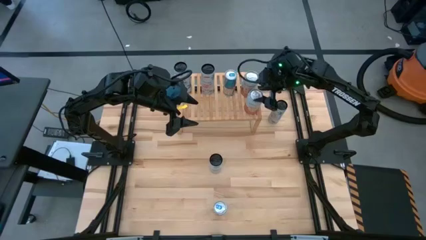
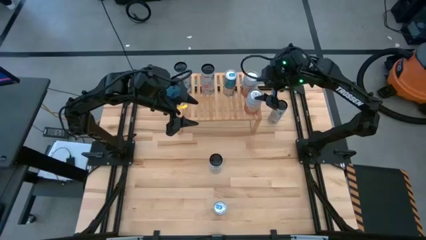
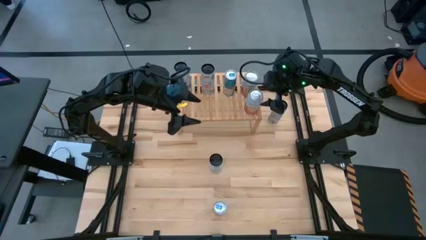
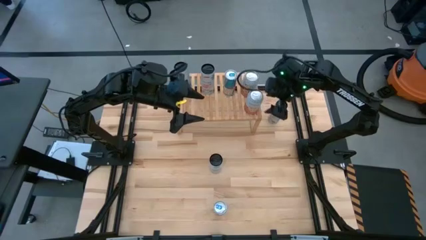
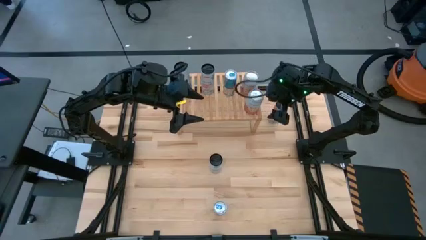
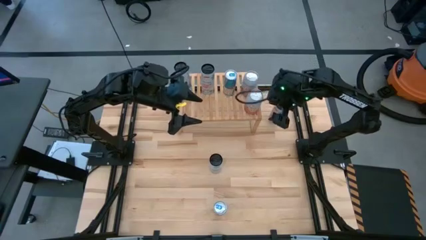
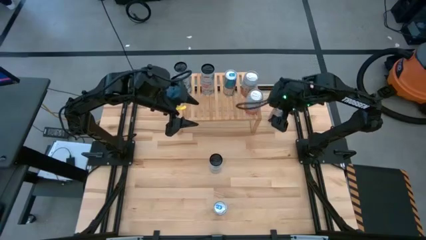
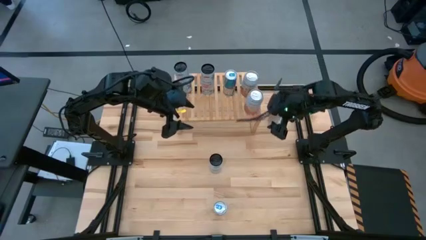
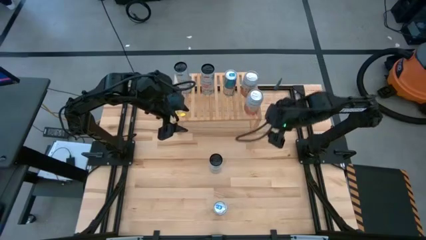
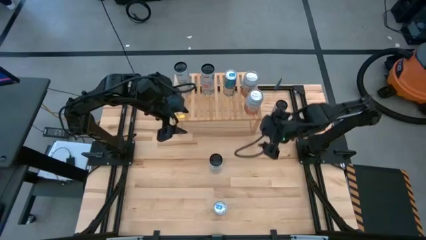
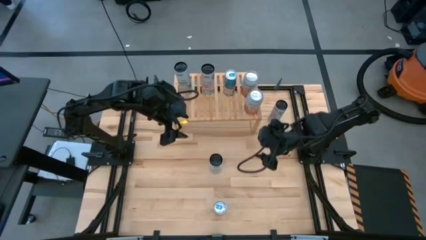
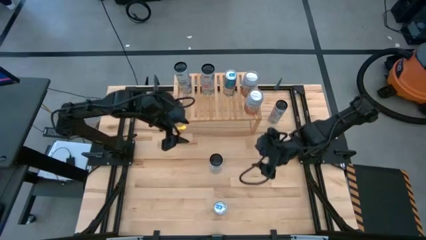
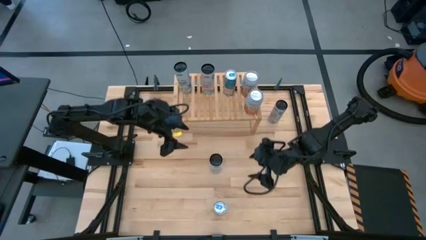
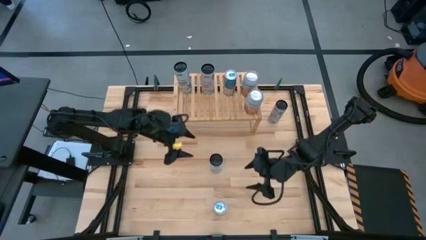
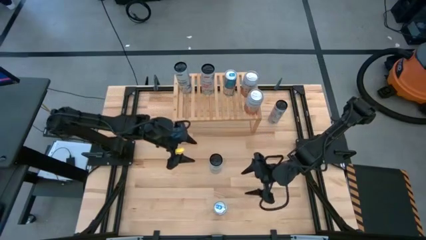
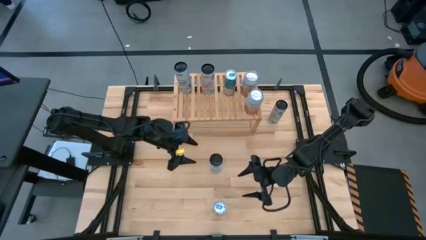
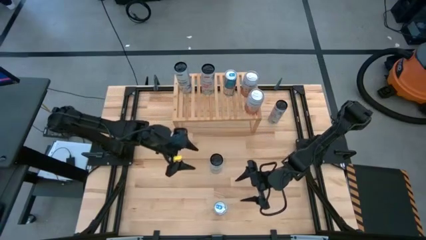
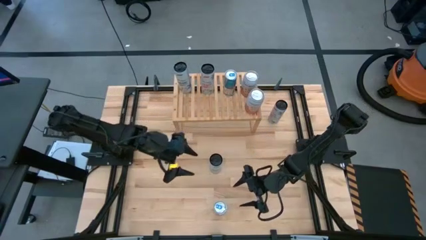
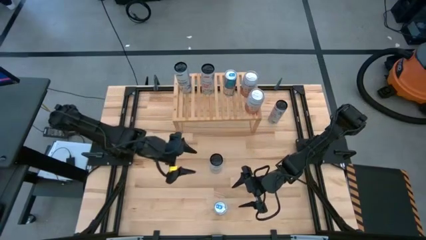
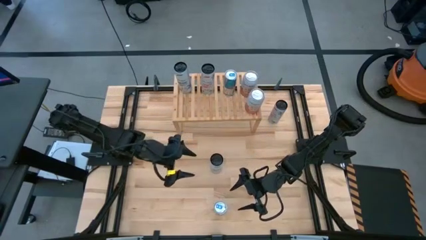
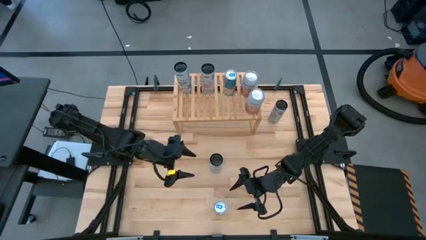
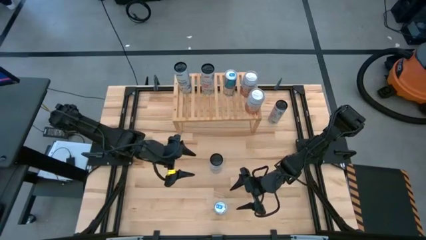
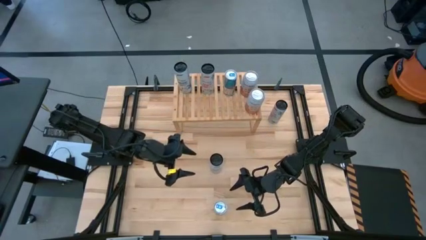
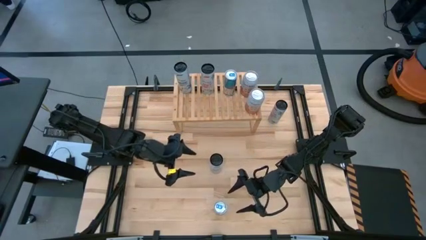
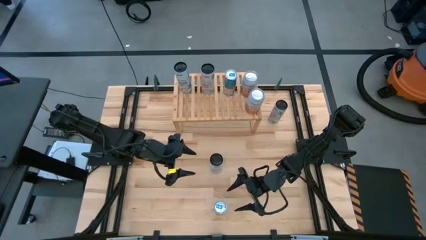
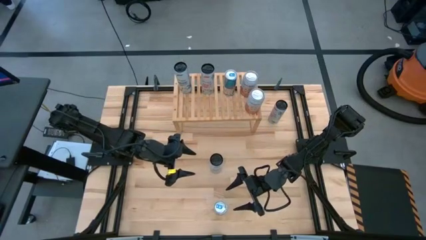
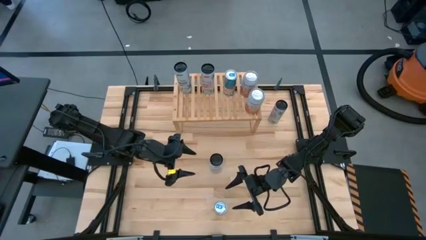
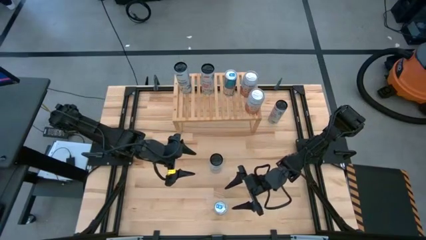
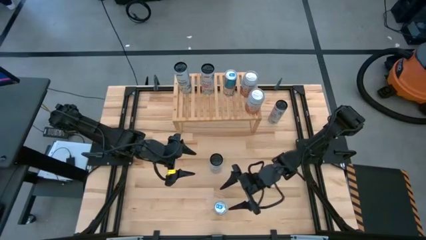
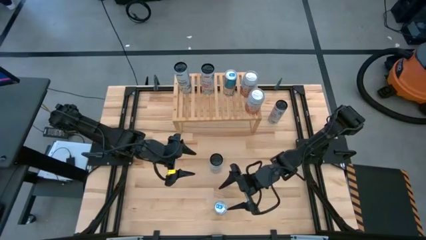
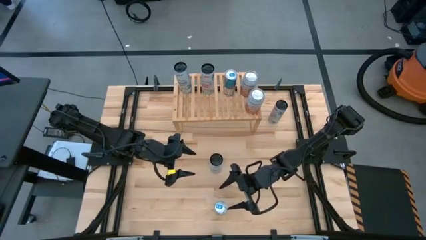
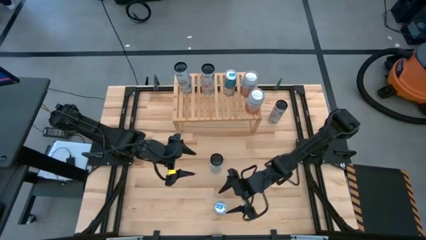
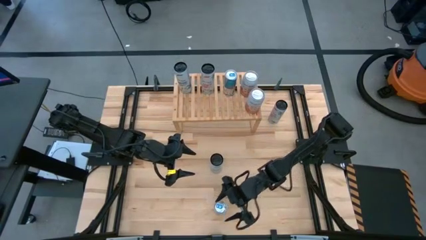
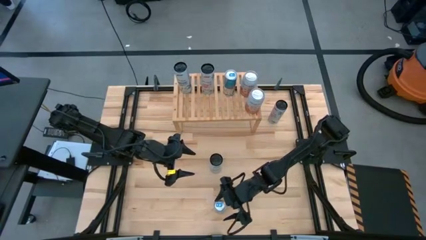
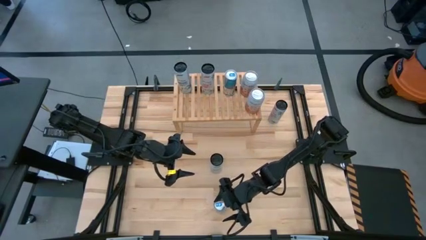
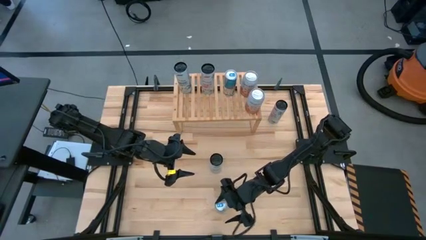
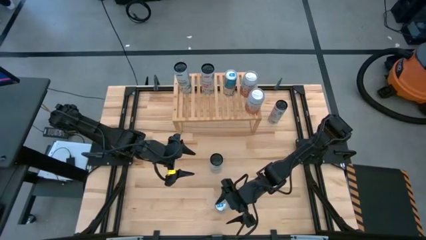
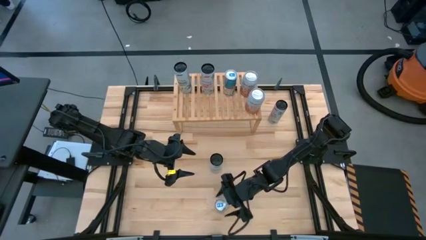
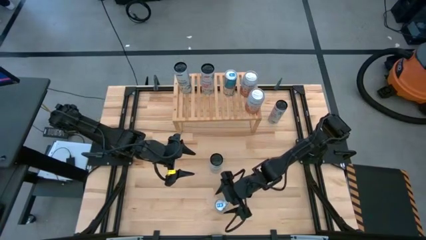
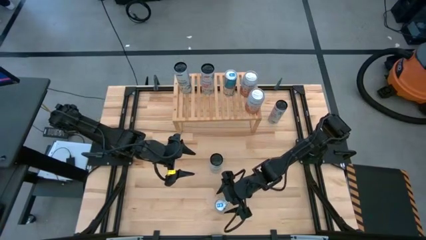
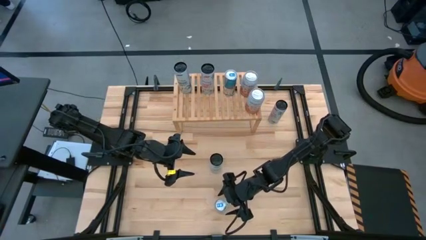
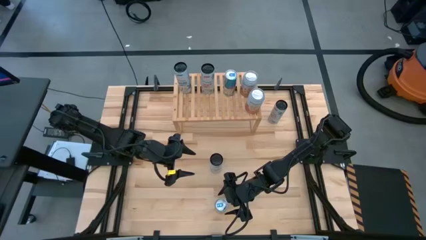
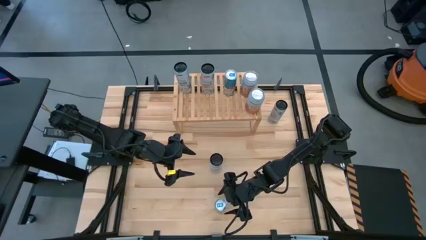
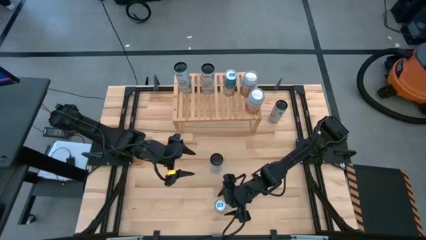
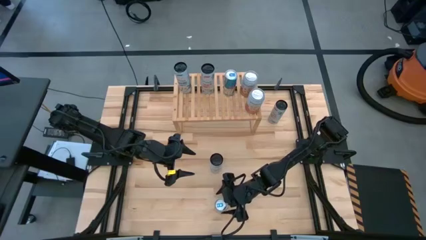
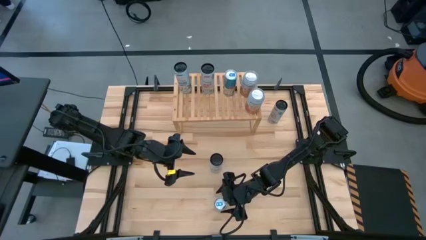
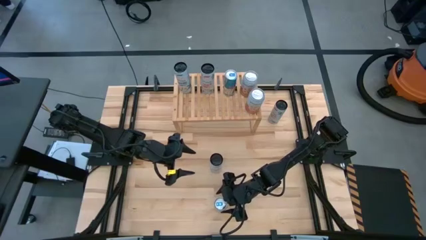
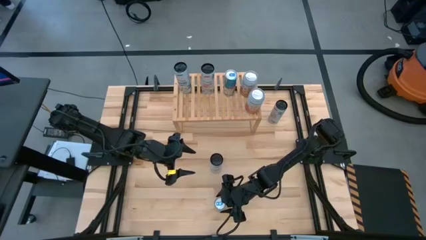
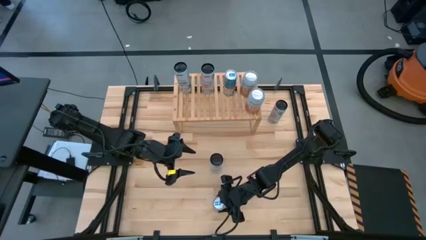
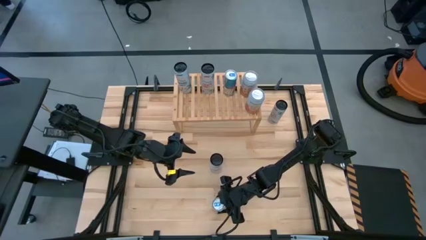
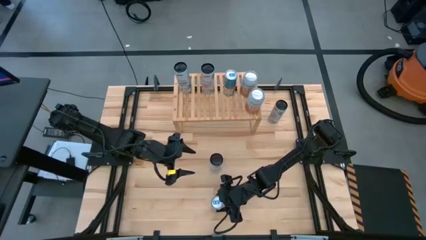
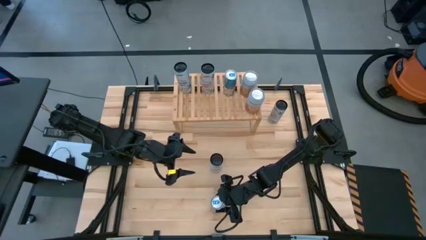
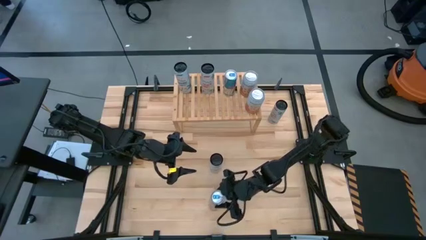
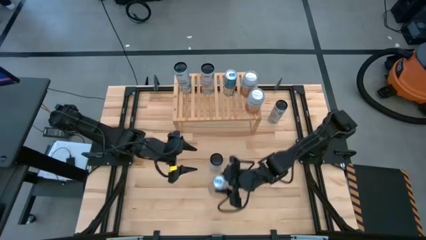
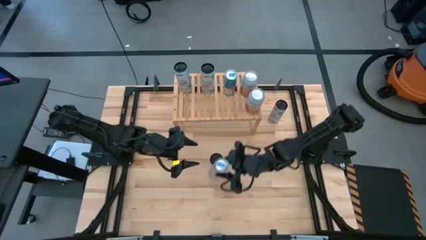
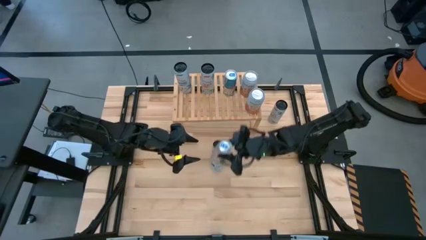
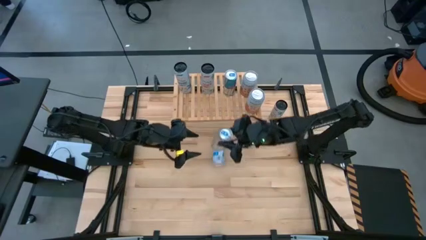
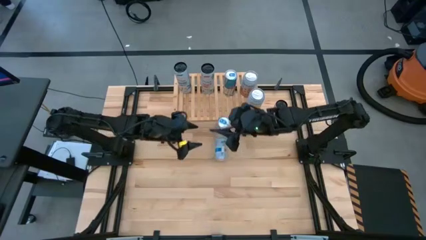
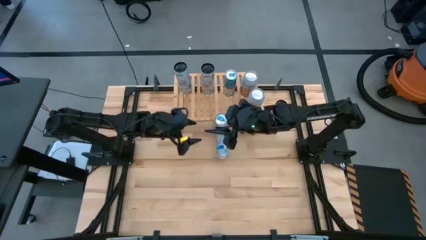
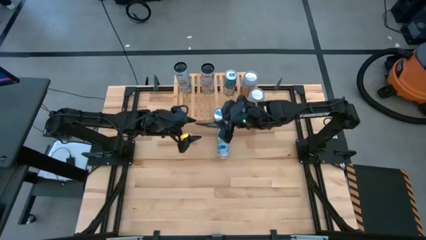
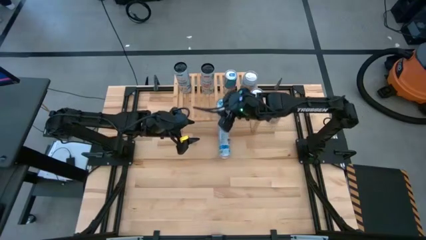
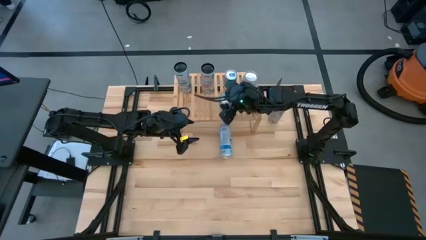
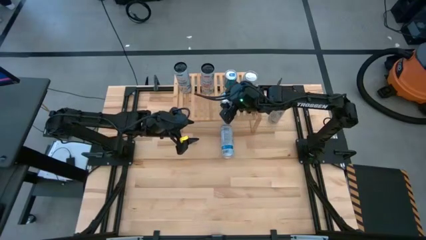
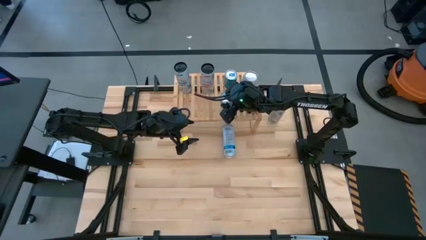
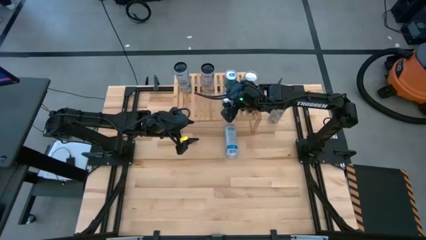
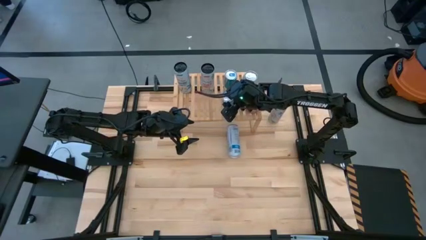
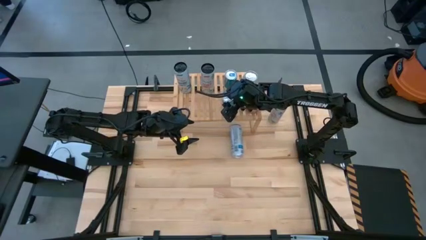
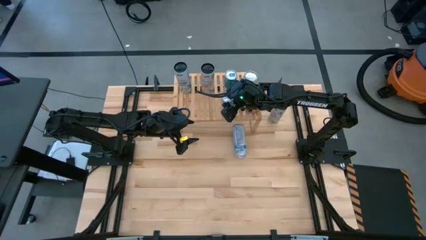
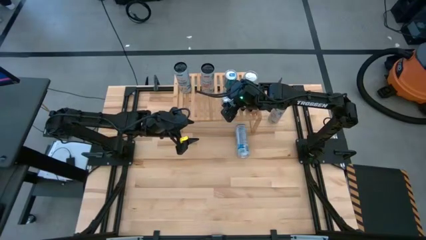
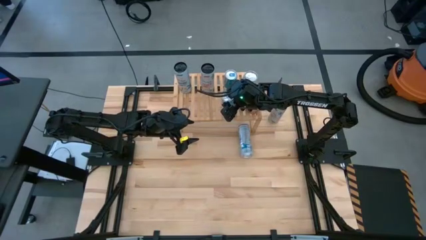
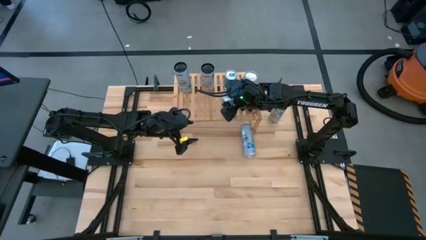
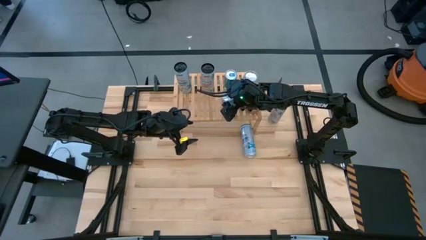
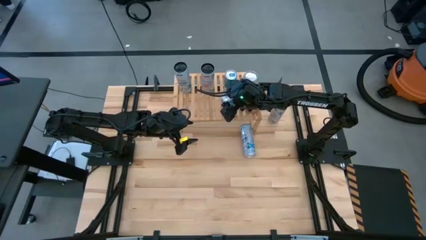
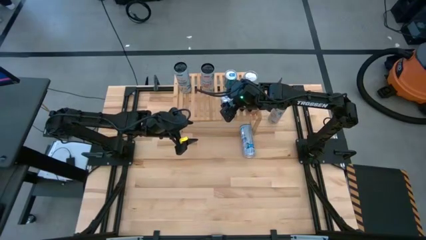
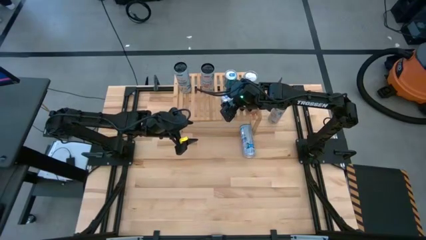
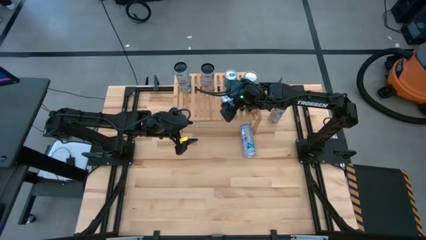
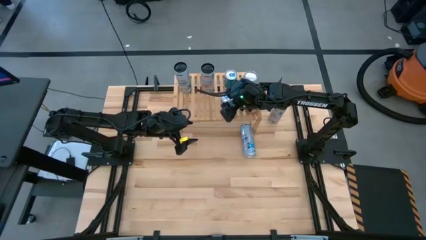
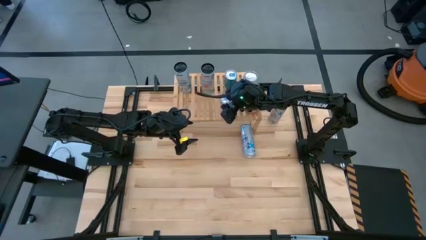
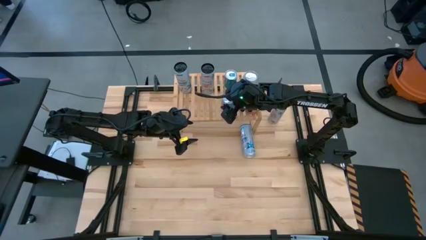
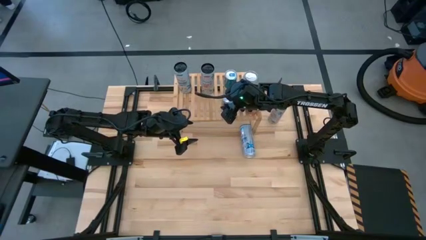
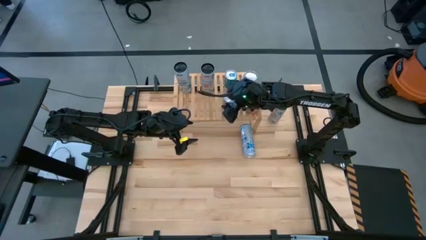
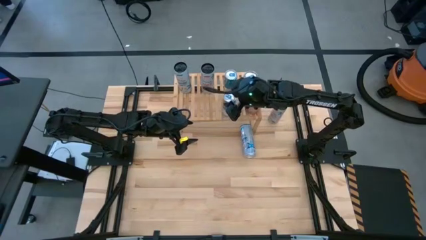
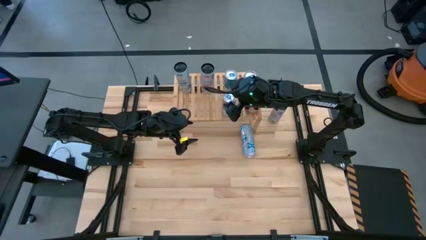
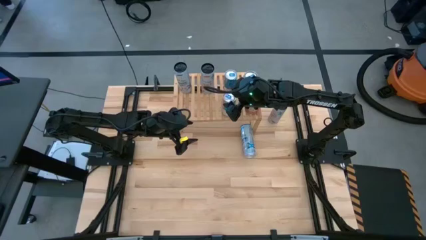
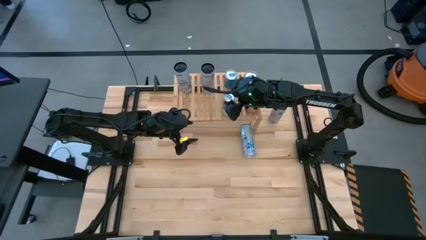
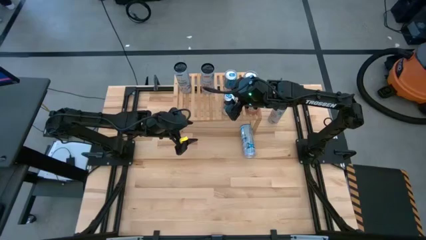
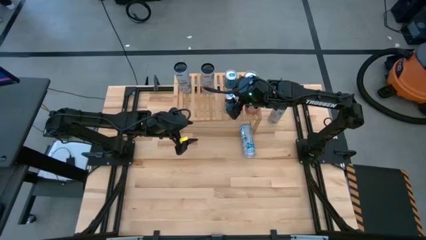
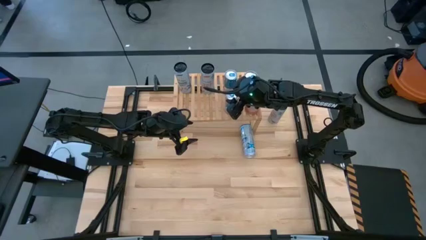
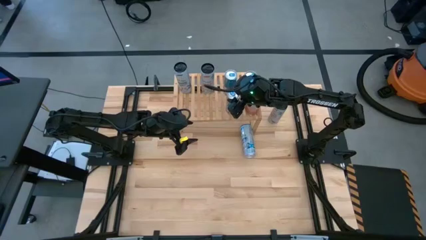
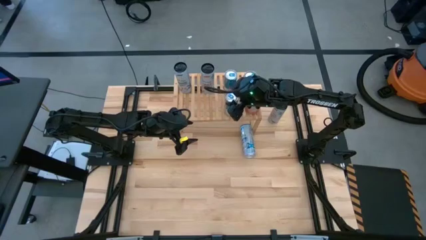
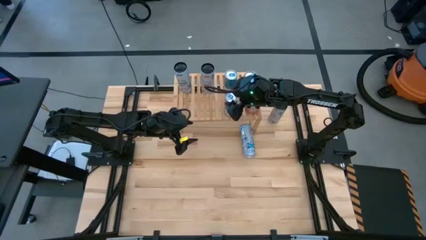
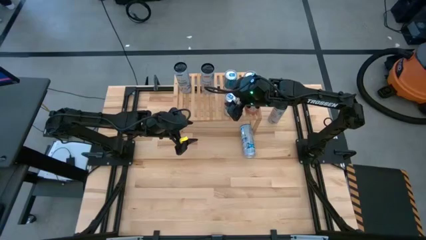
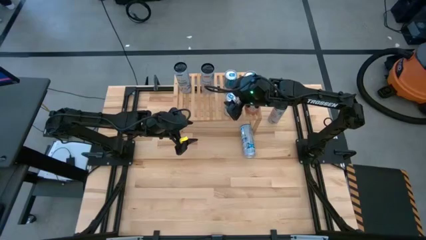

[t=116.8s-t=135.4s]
Task: Place canned beverage on shelf
Put the blue soda can on the shelf aligned with the other blue soda can
